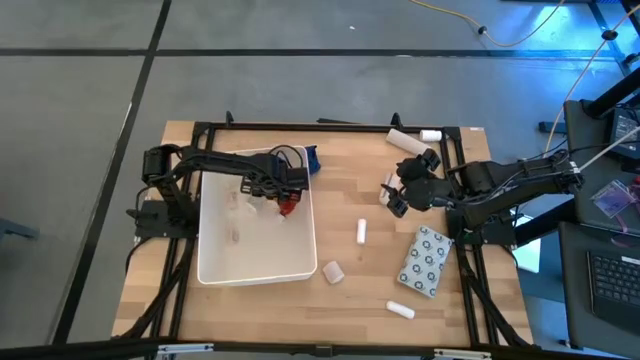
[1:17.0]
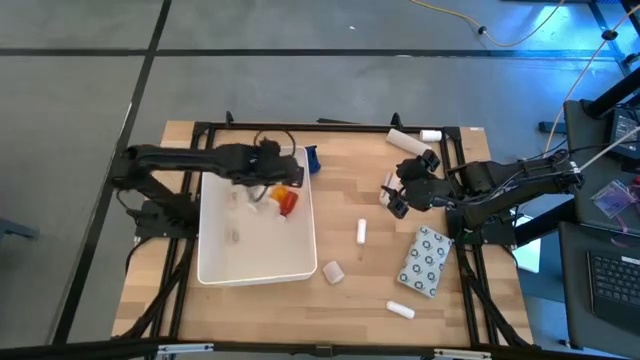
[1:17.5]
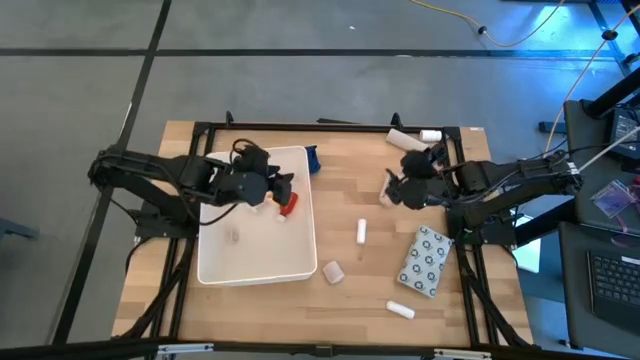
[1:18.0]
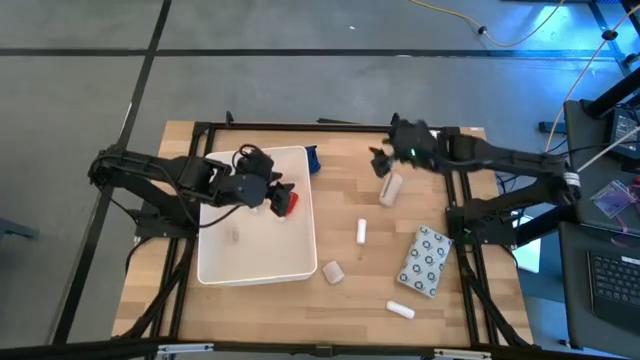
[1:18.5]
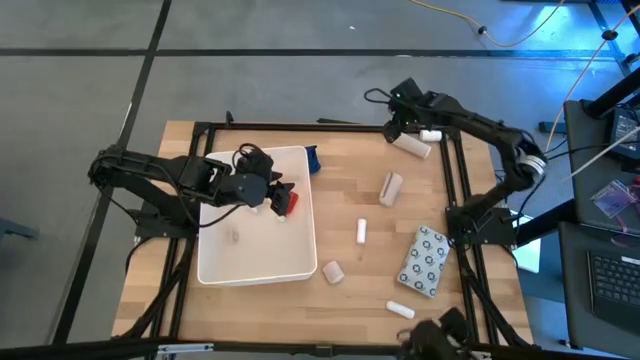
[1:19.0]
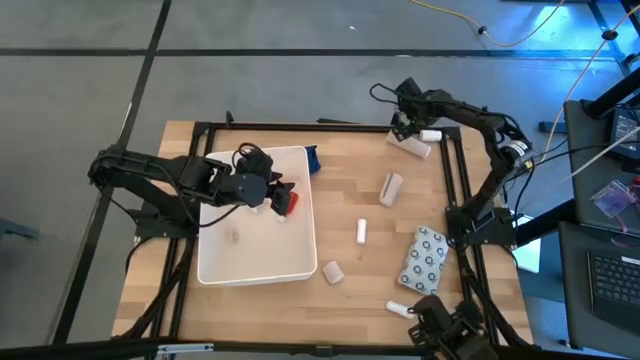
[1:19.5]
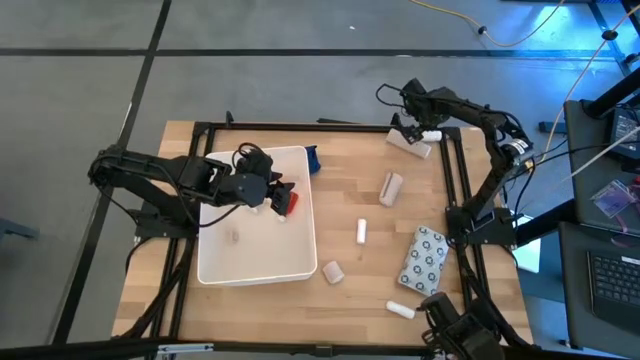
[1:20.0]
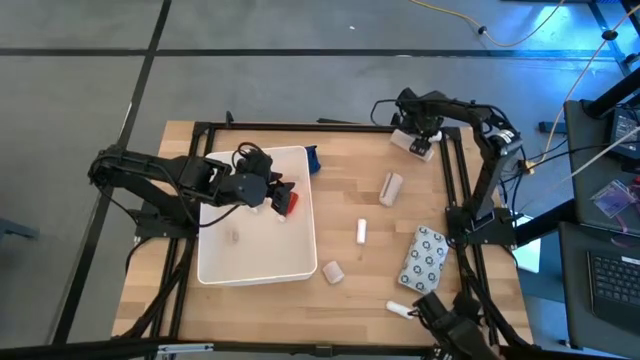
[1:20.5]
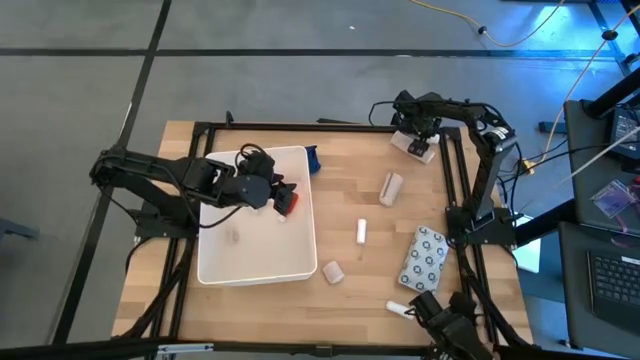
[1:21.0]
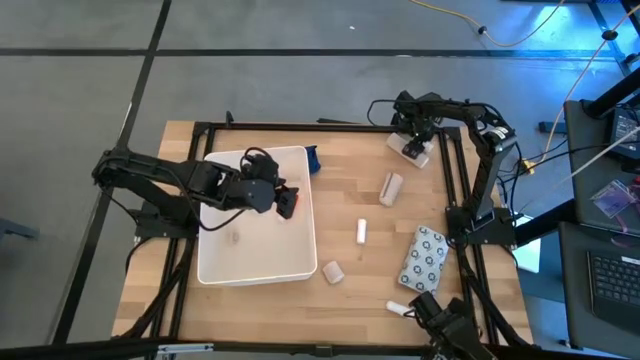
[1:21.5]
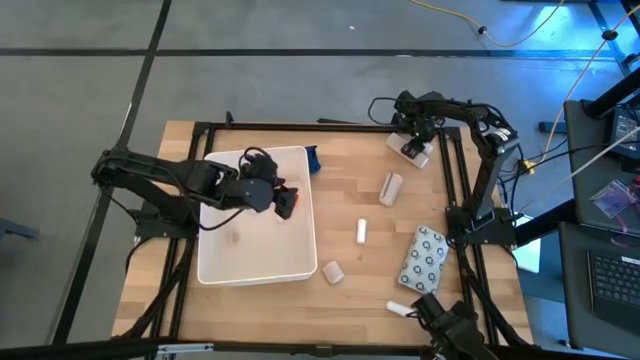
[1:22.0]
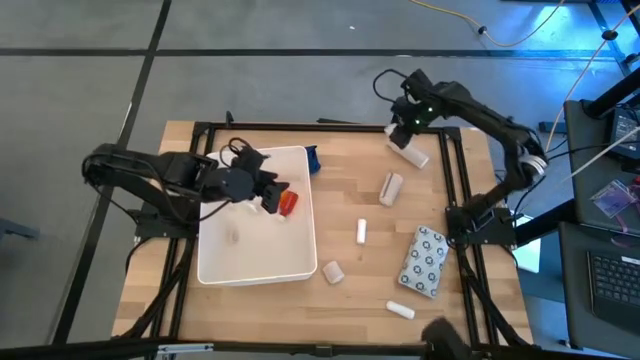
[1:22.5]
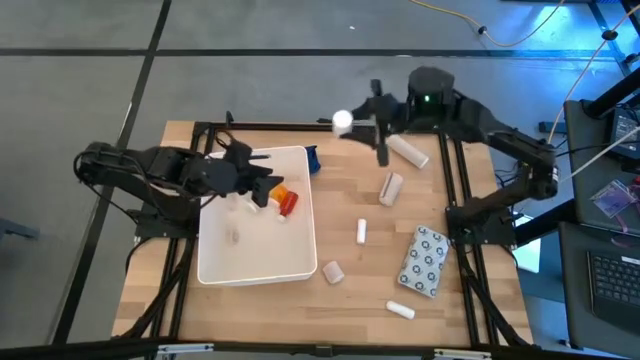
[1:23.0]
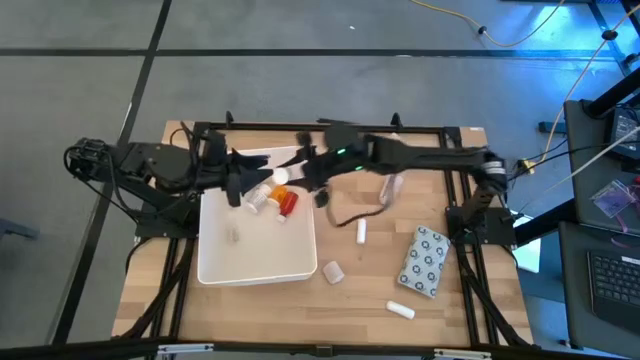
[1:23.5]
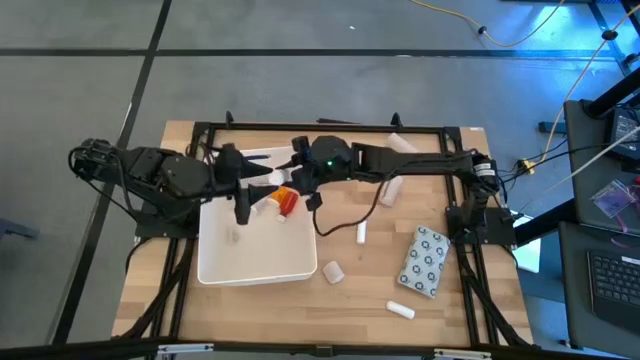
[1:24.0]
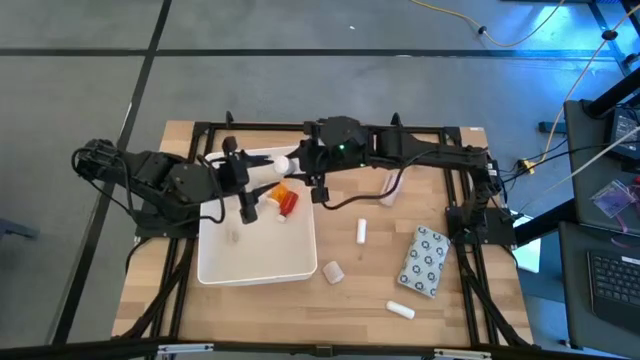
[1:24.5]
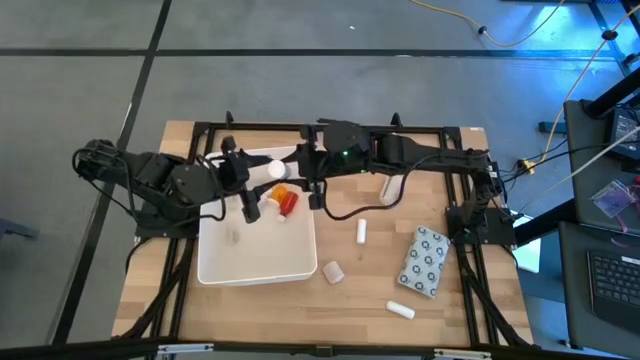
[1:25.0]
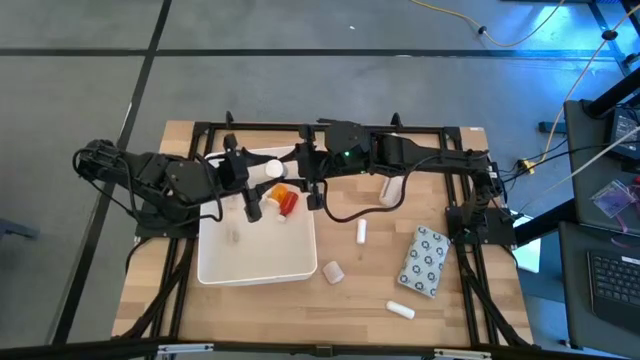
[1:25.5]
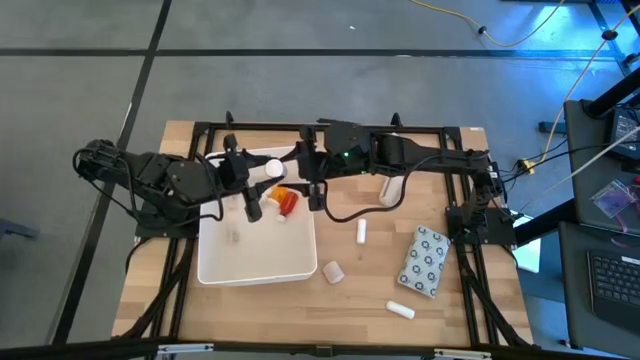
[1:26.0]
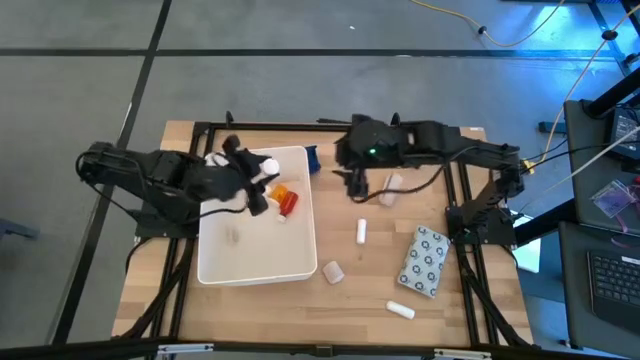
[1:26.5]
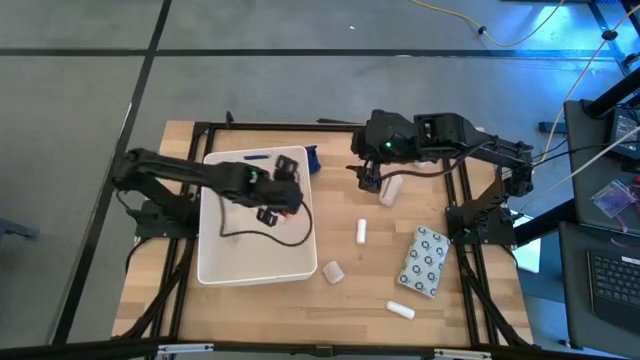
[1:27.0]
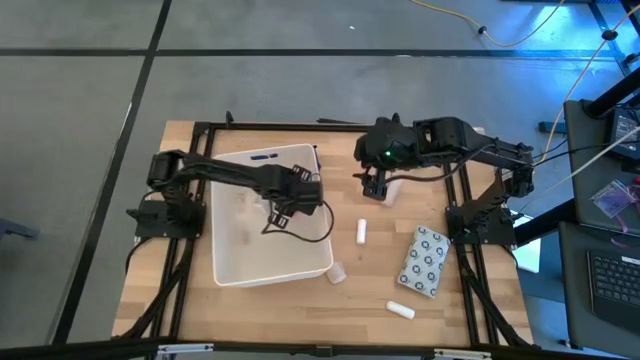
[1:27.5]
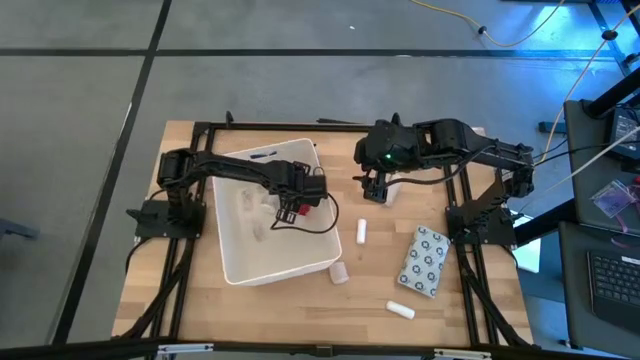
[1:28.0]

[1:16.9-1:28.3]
Task: Pick & place medical supplies in basket/bin
Put the white medicine bottle into the white bin

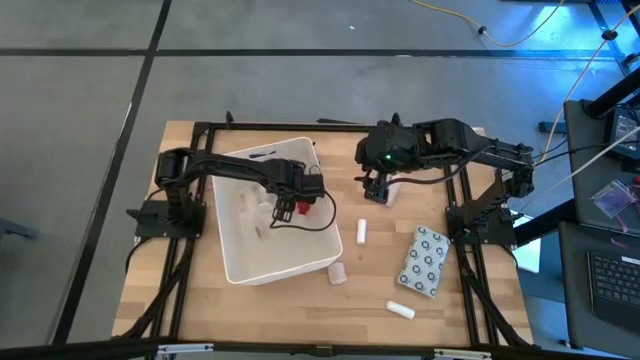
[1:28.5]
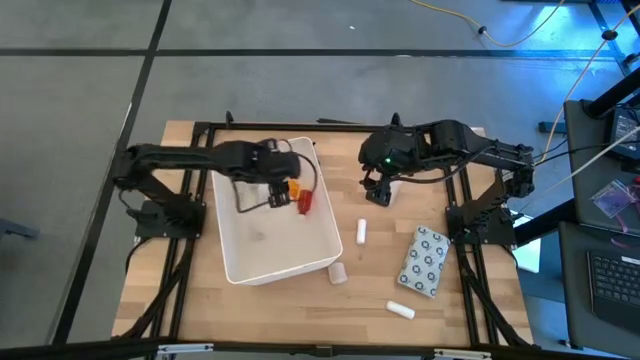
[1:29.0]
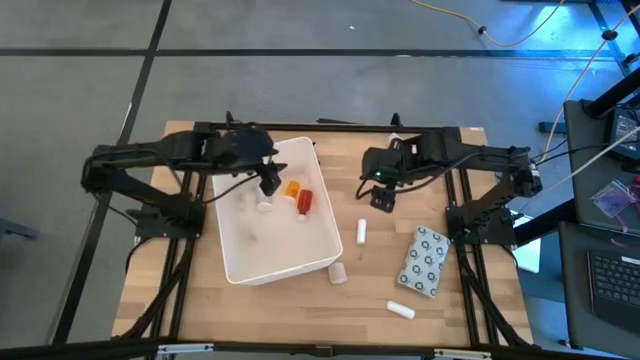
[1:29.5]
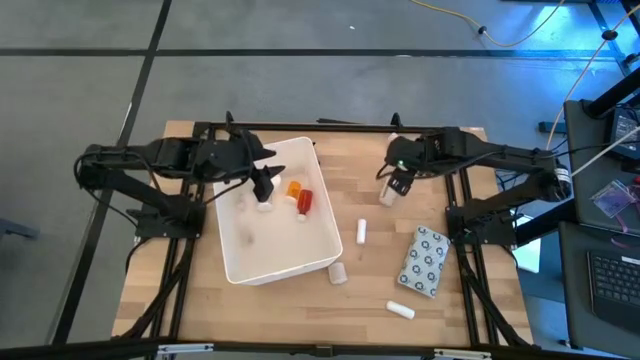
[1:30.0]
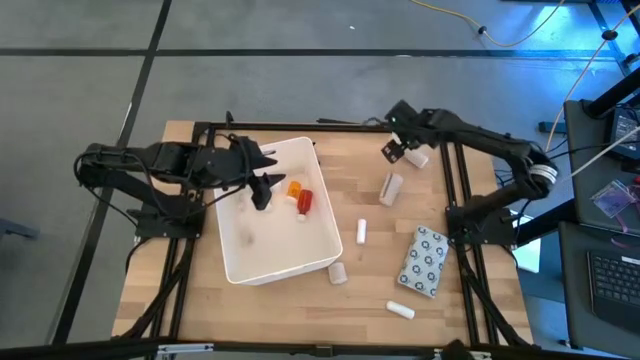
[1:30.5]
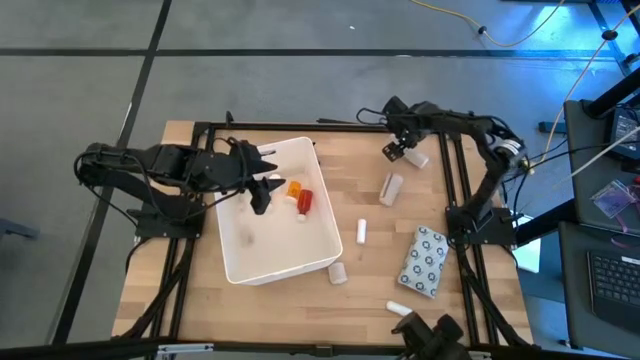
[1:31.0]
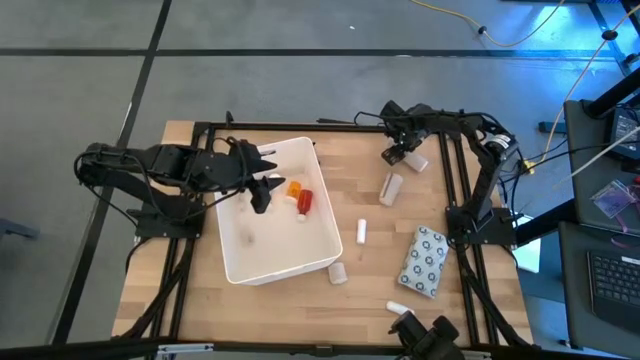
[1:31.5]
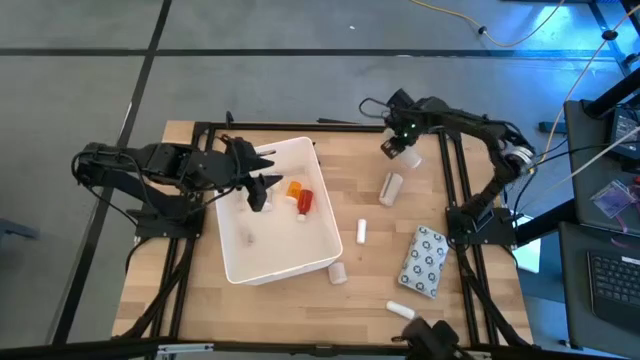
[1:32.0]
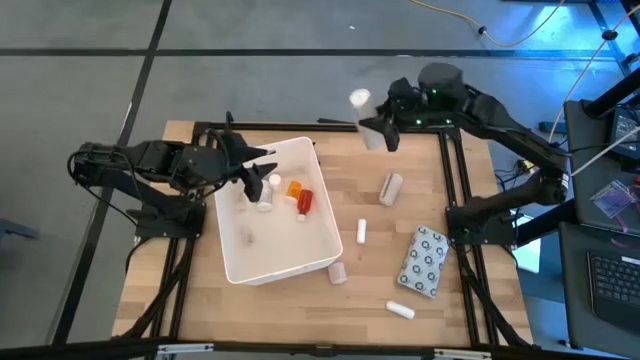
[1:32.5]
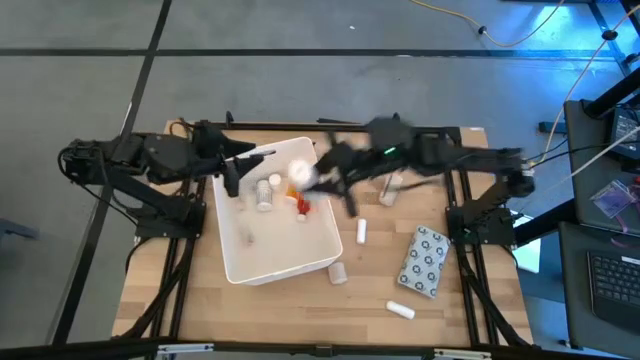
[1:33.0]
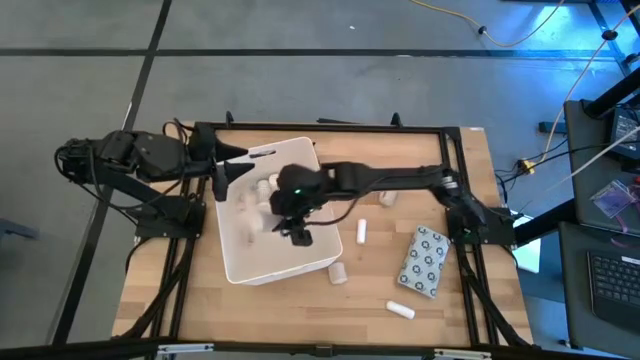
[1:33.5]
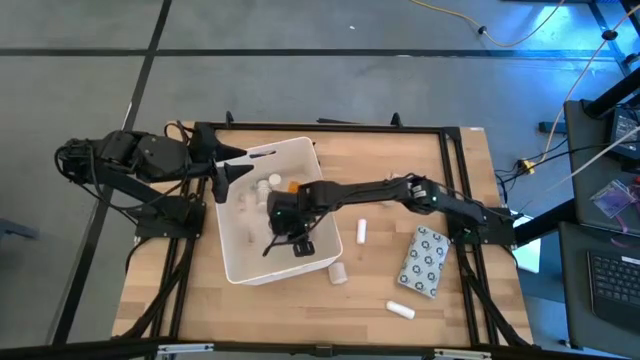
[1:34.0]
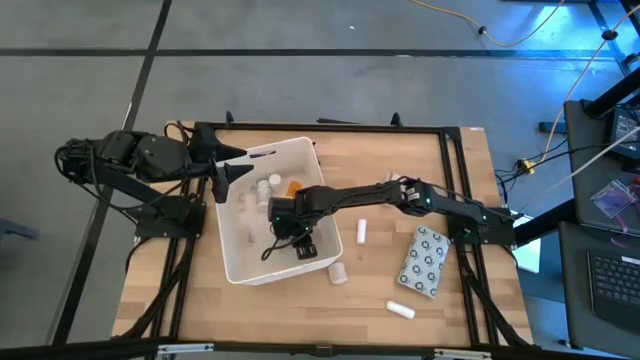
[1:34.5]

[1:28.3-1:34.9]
Put the top light brown bandage into the white bin

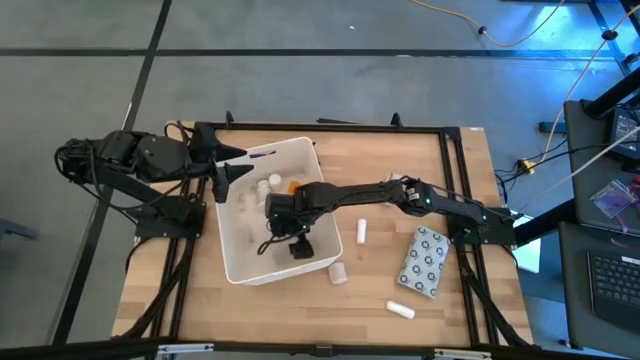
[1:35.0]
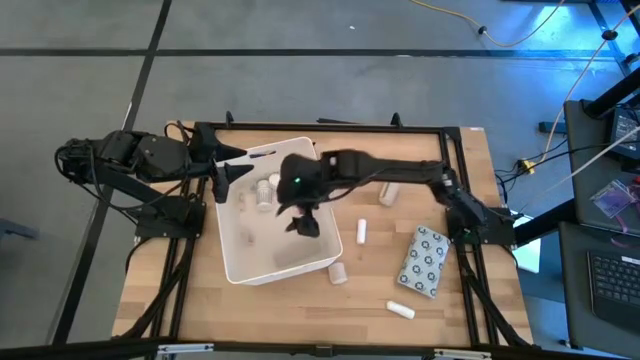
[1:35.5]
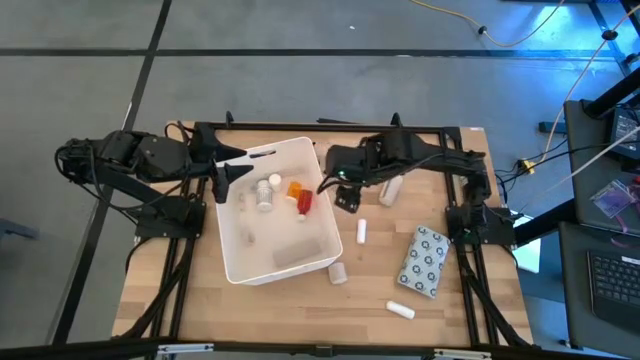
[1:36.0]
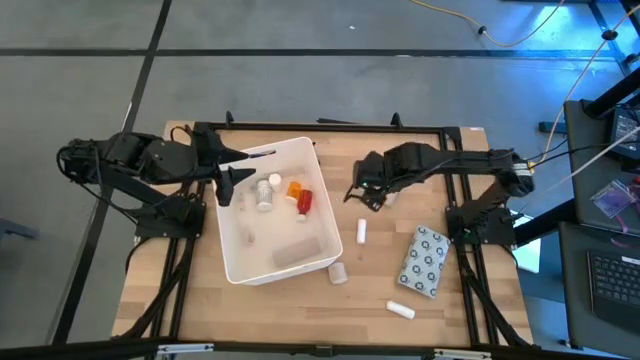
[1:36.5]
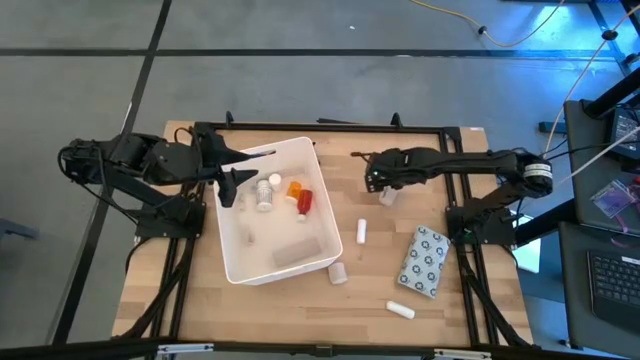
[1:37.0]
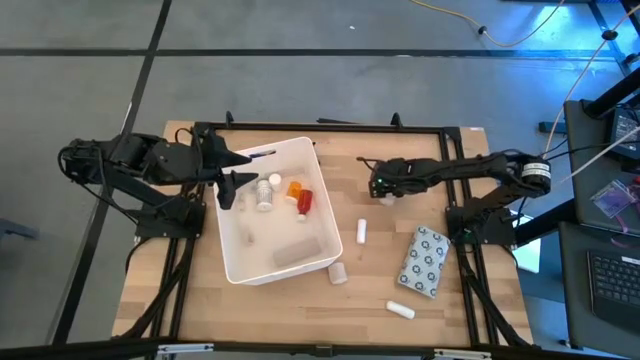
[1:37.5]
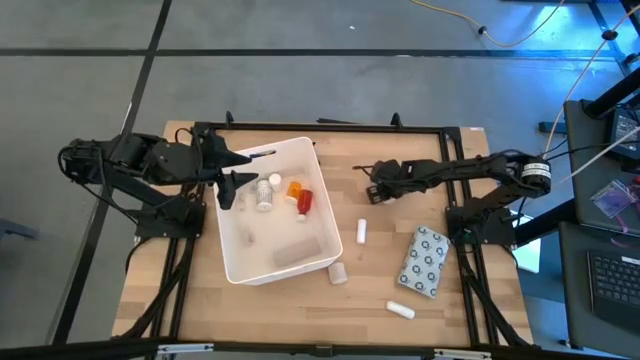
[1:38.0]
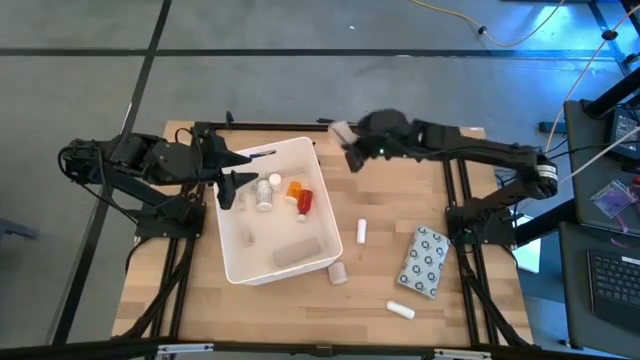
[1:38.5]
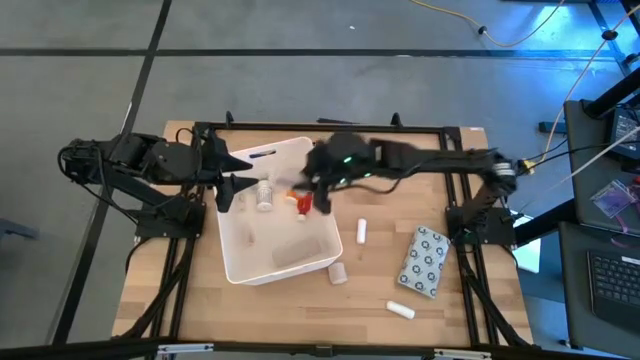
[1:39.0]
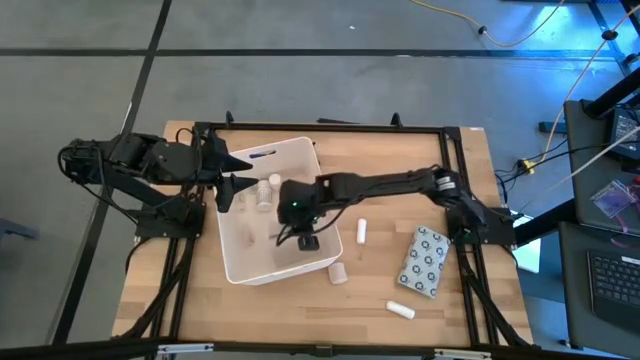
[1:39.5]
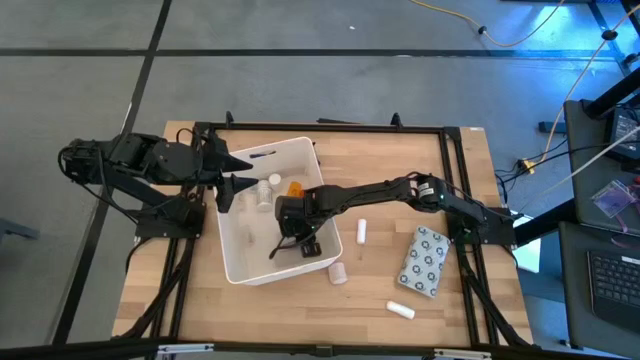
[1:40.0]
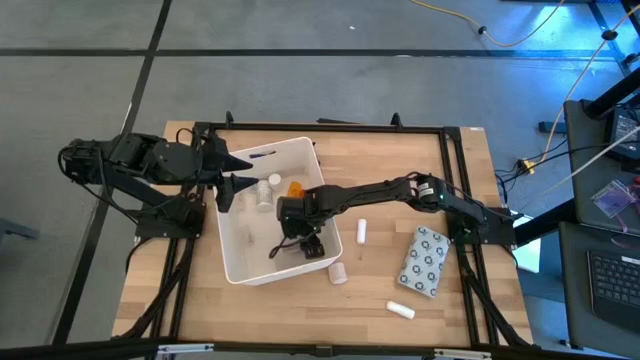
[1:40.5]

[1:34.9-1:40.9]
Put the top light brown bandage into the white bin
